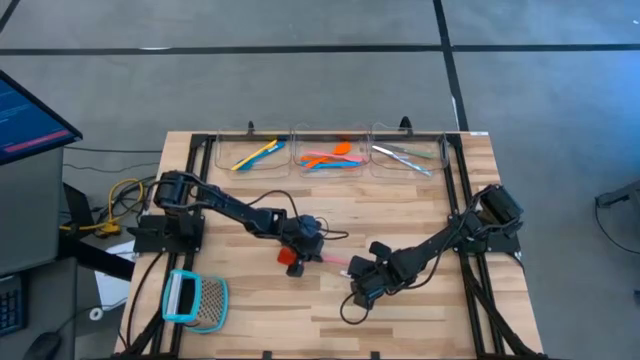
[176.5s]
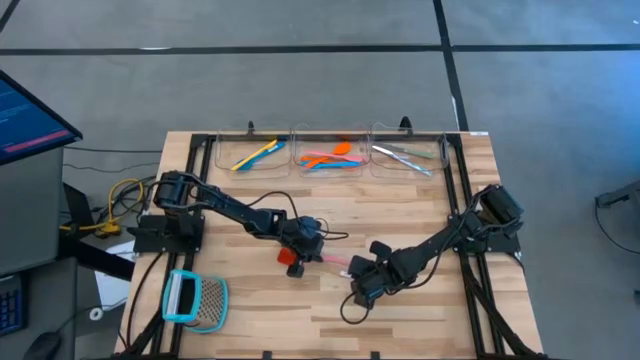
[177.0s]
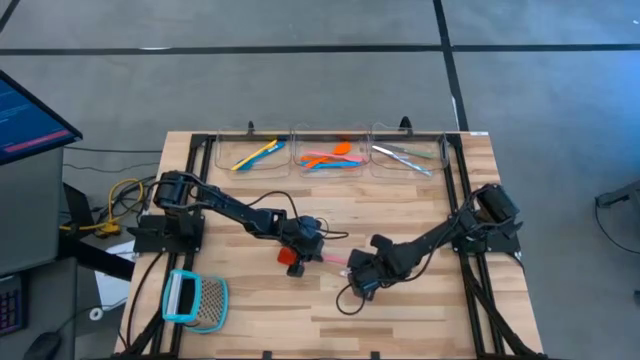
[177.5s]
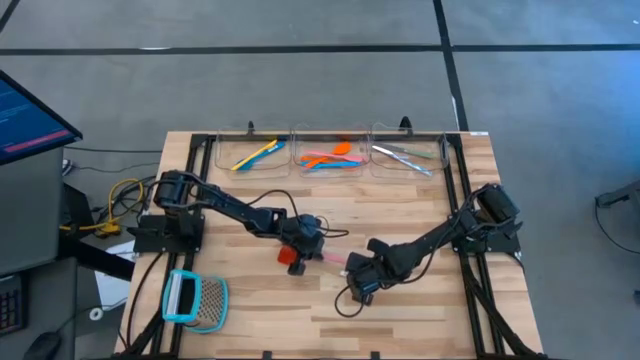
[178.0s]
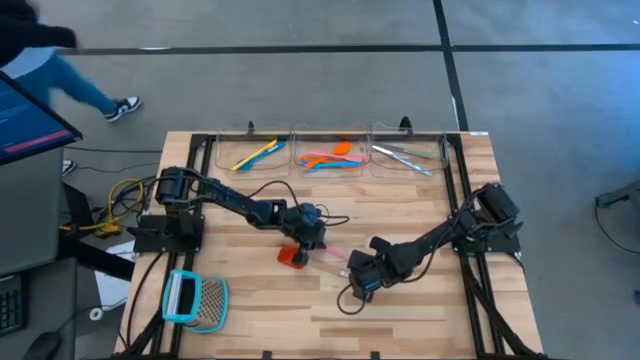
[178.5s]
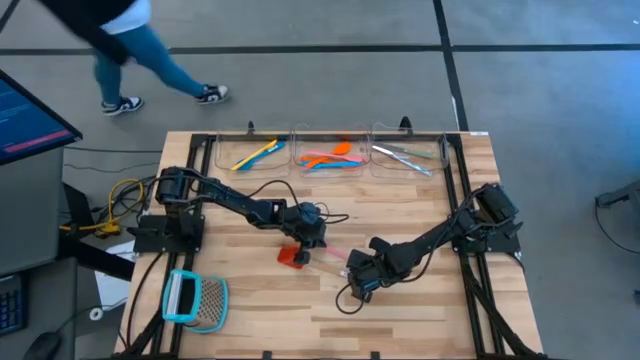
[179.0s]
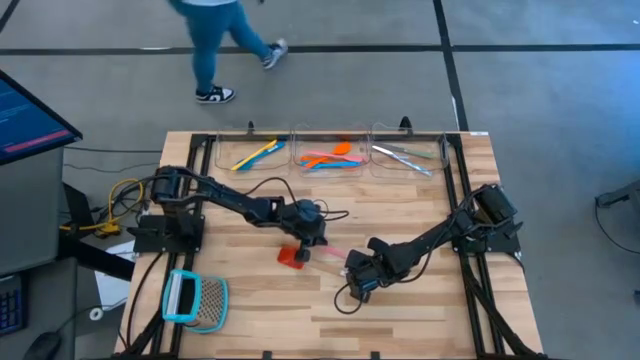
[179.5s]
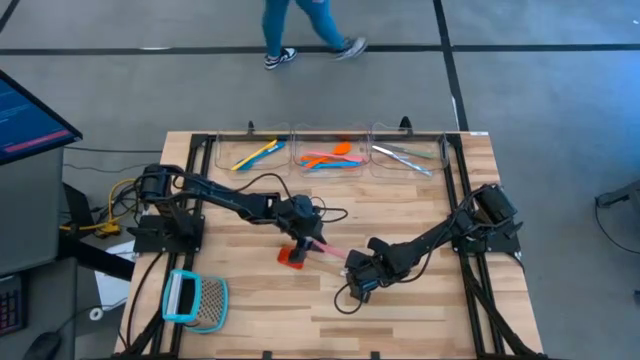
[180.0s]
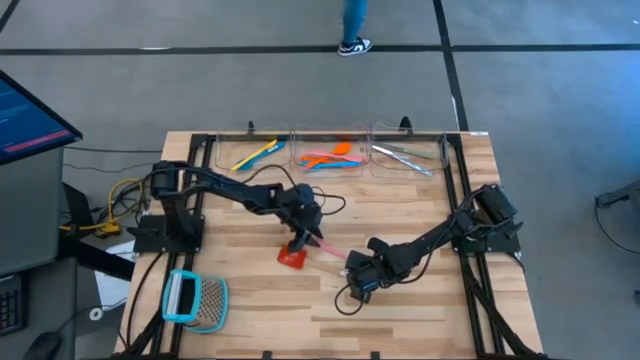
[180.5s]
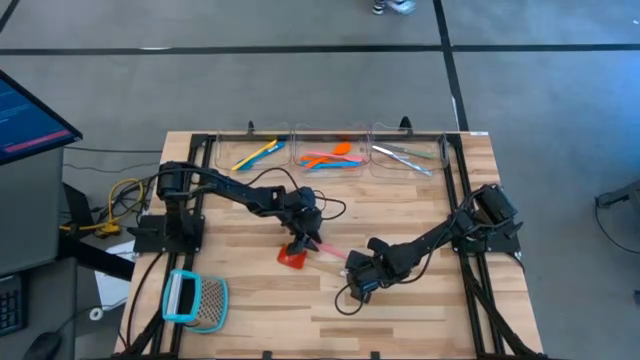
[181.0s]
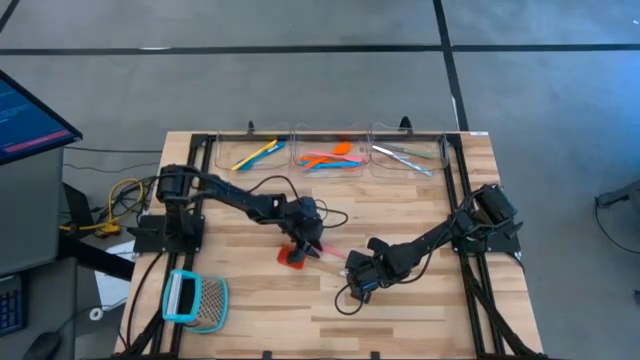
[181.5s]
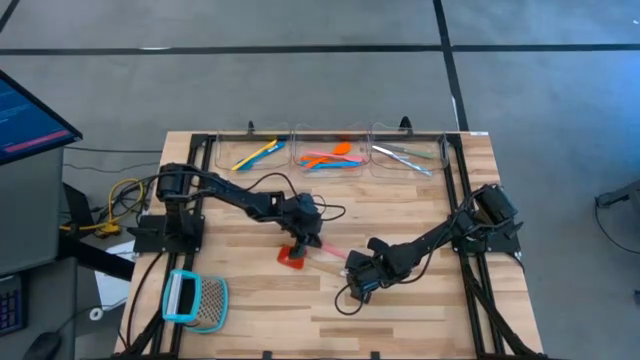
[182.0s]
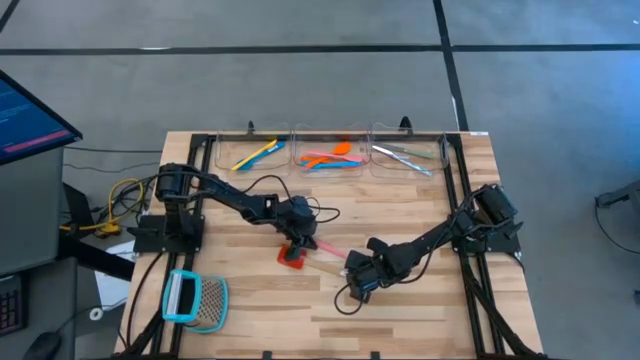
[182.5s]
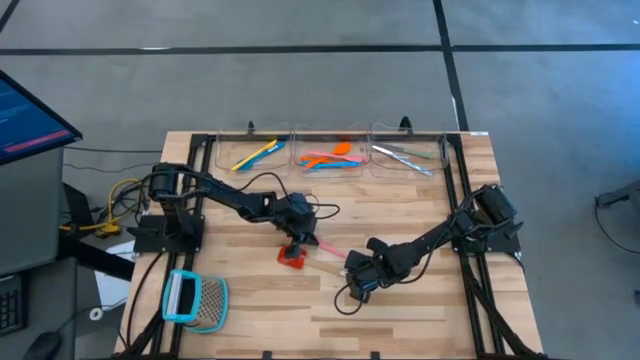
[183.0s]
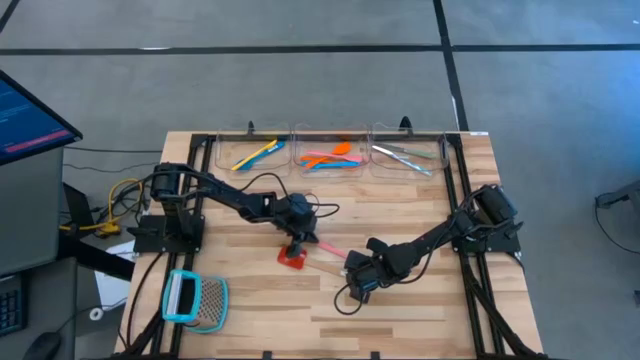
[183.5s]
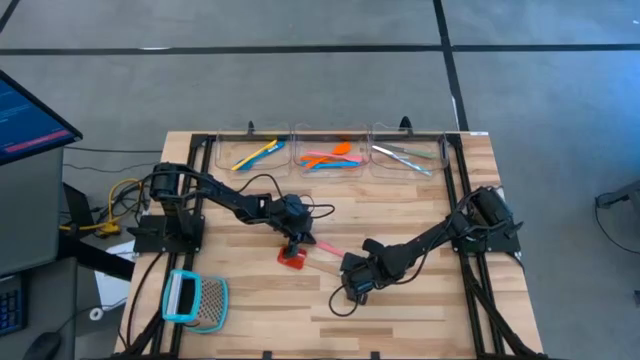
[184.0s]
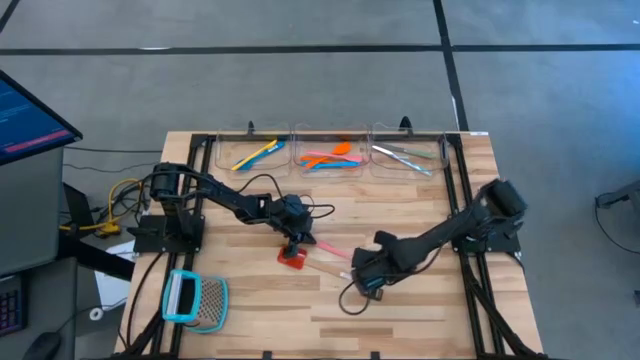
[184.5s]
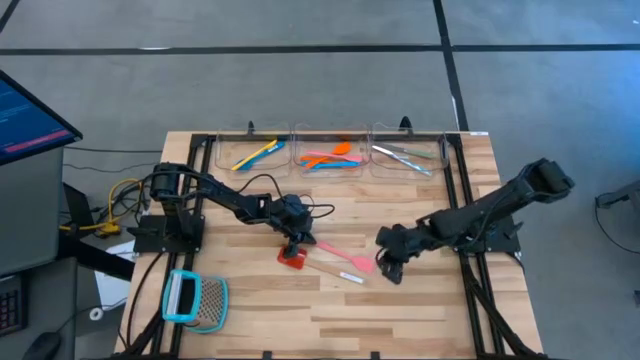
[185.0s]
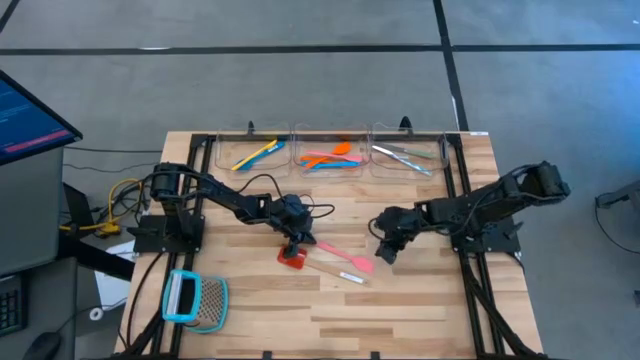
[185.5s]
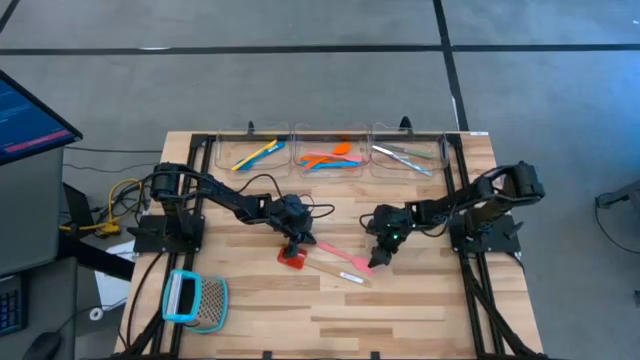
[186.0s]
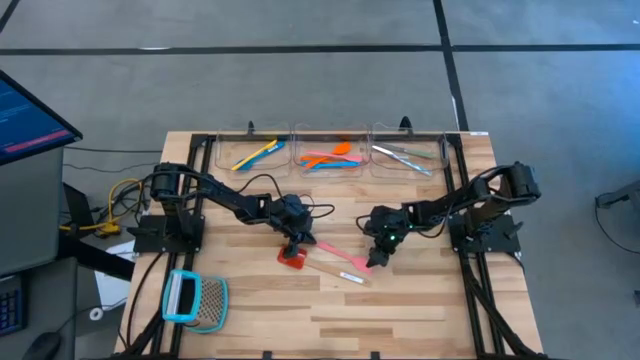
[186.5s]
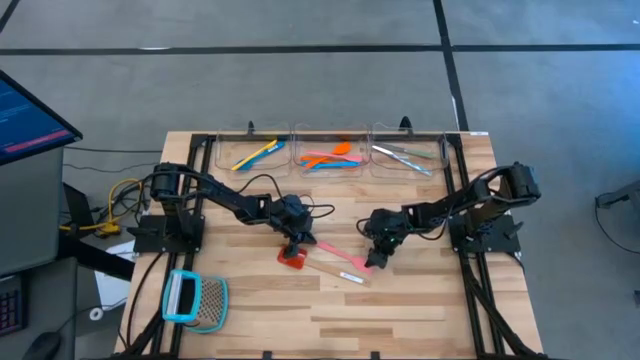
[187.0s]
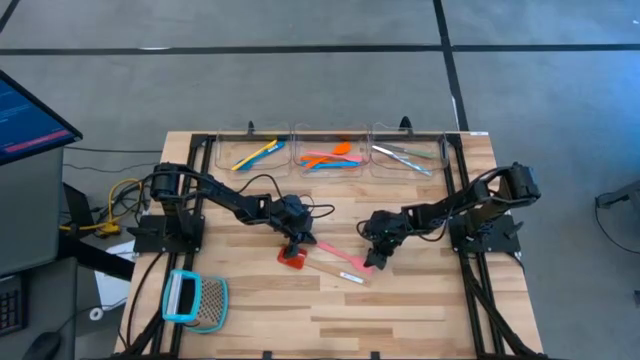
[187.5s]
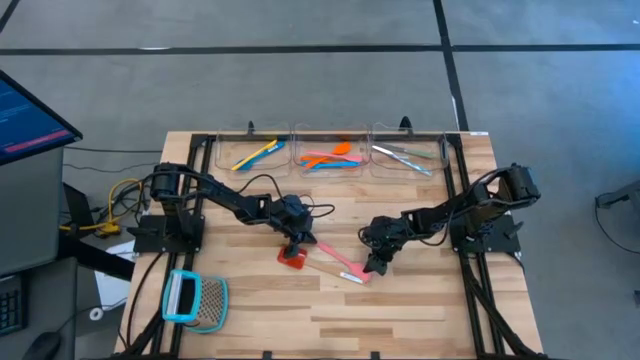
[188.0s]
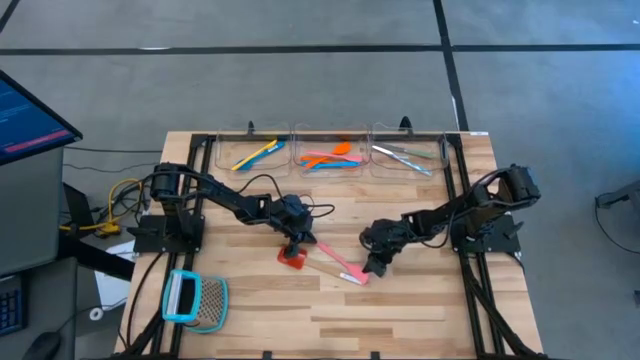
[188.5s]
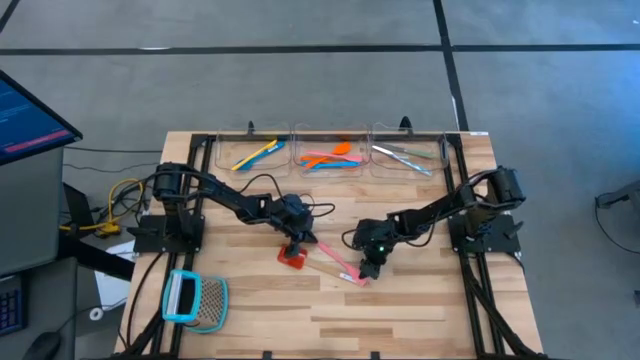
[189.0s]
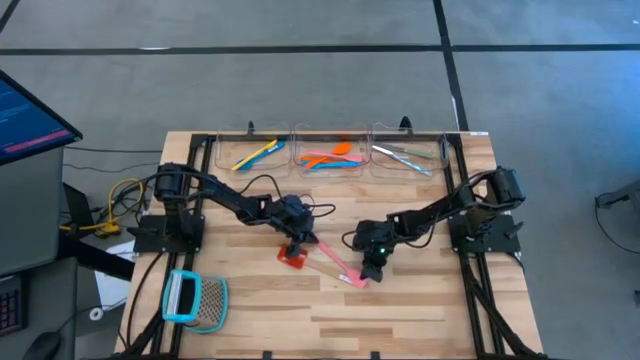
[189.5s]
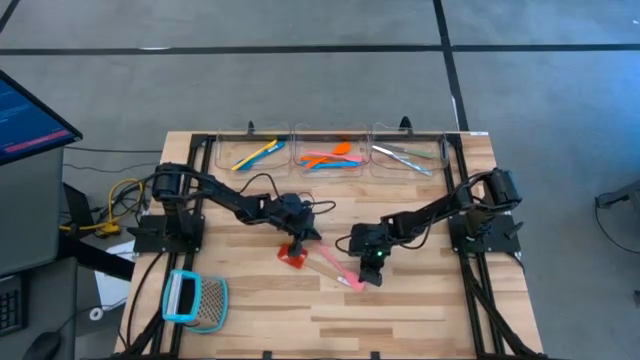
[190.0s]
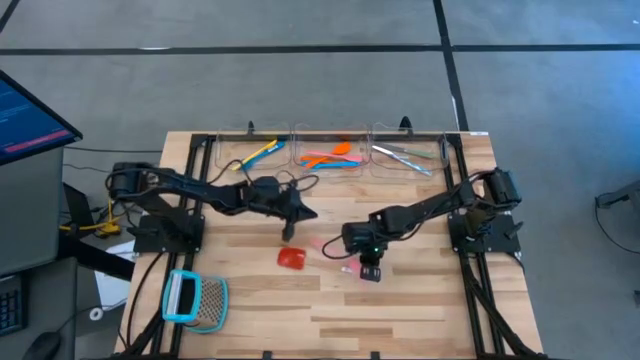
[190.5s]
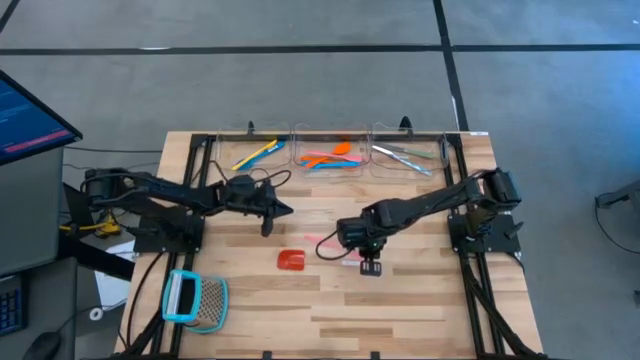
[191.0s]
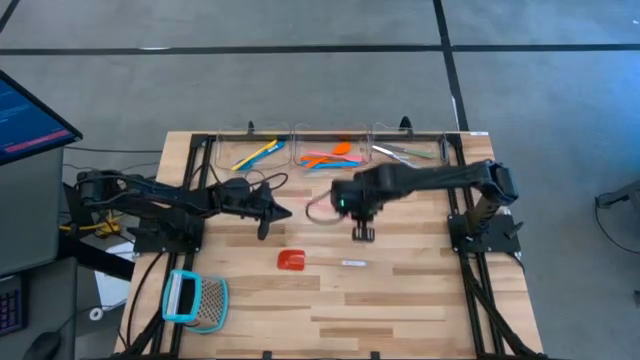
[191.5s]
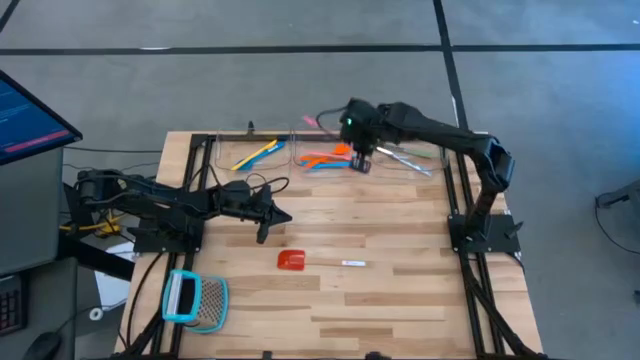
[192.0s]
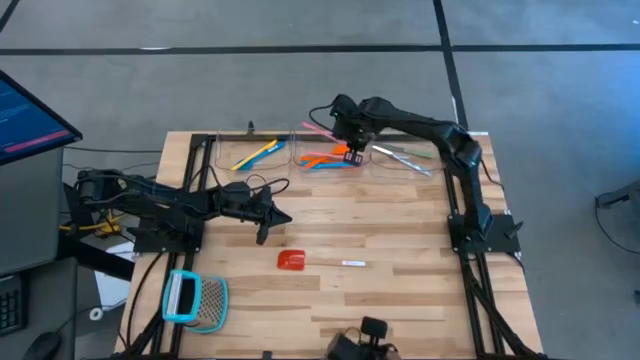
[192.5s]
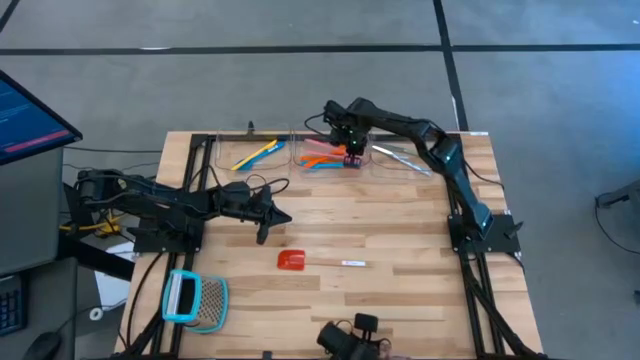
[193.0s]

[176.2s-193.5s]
Task: Pick & Place Kitchen Items
Put the pink spatula into the middle transparent bin

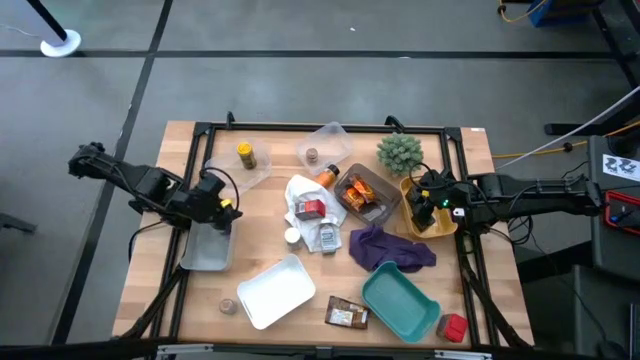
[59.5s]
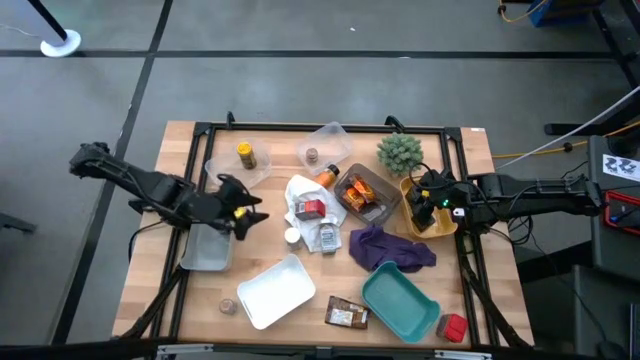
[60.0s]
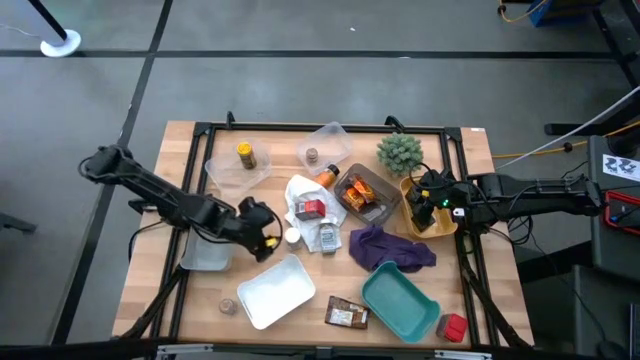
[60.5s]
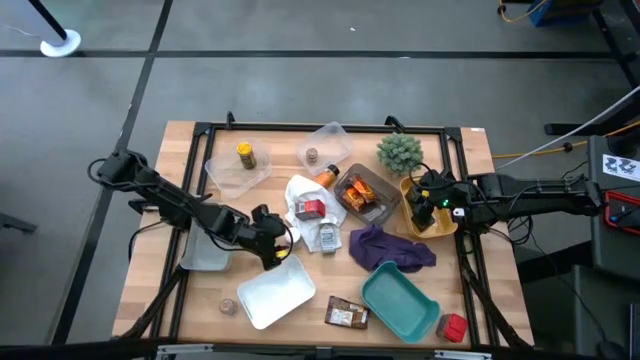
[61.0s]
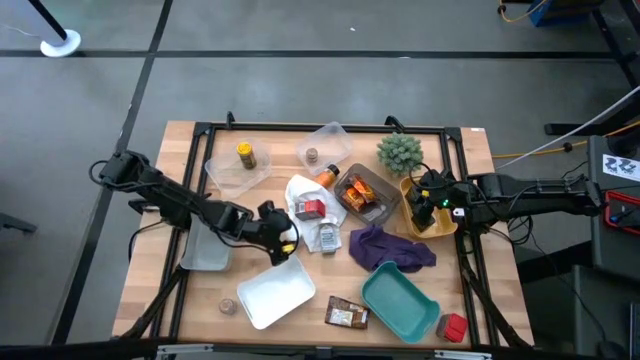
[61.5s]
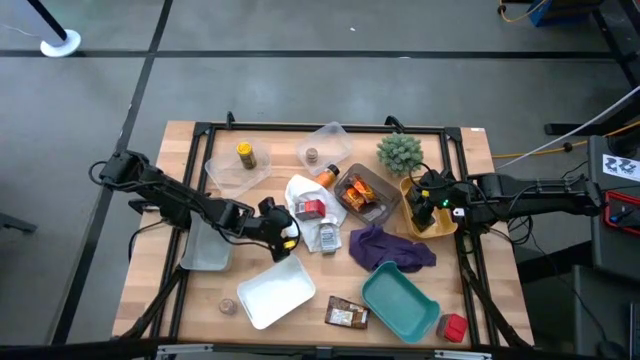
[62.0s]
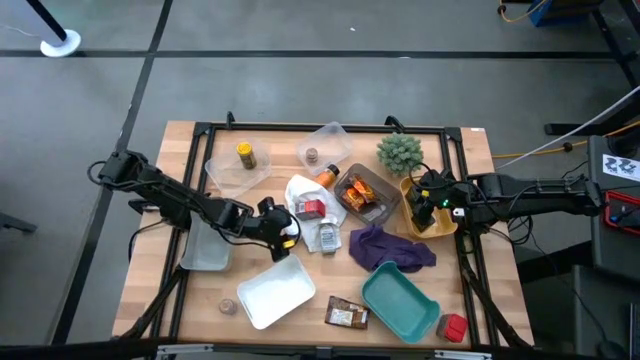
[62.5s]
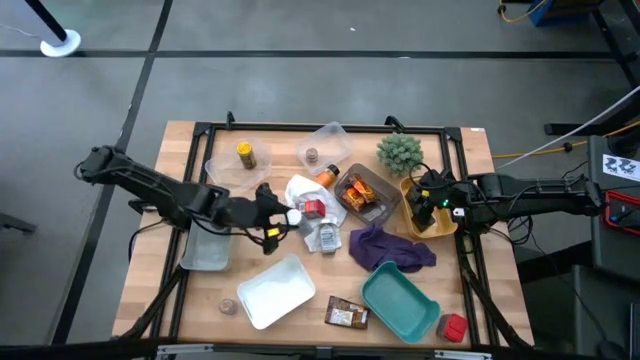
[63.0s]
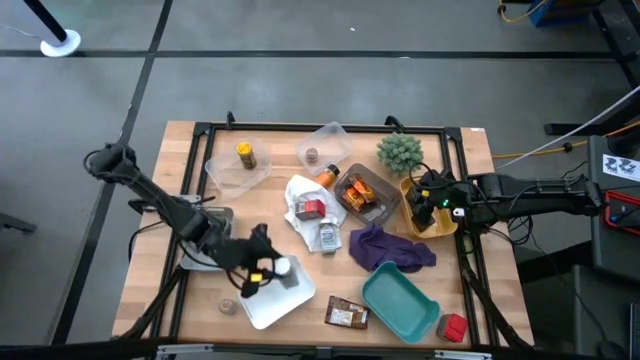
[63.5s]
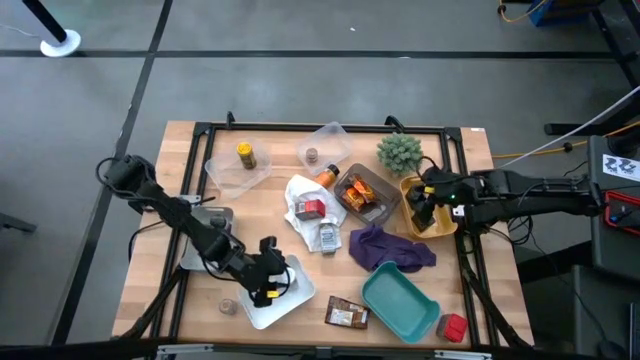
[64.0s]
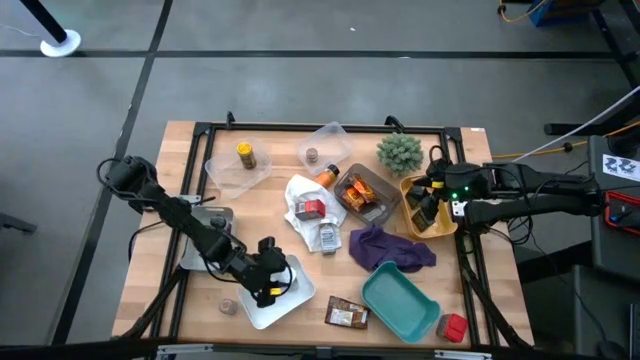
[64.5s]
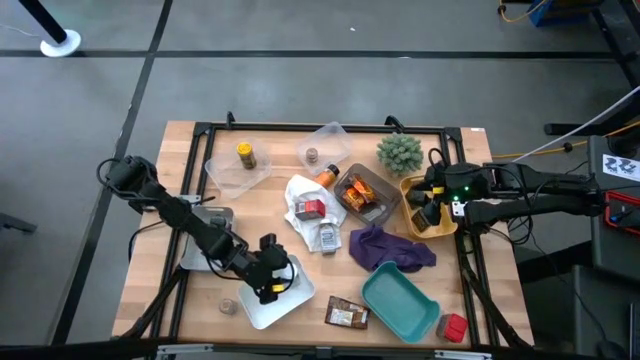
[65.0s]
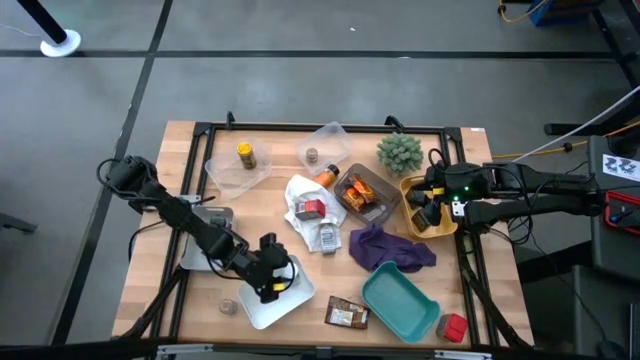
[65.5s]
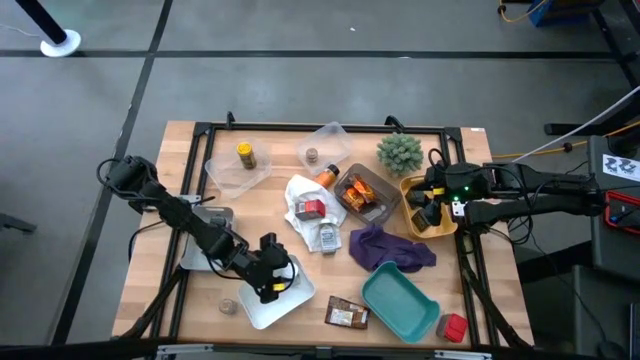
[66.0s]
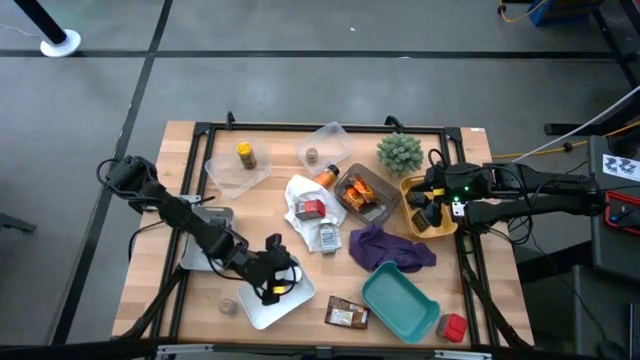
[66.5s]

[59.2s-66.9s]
Task: Sort spices by type
Put the left white spice bottle into the white bin
